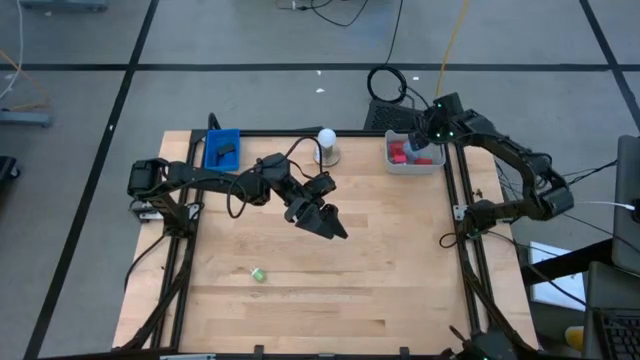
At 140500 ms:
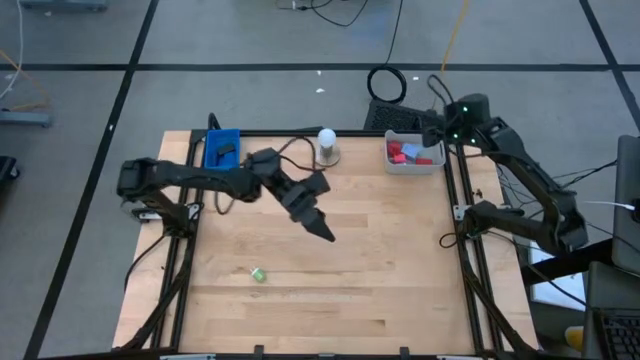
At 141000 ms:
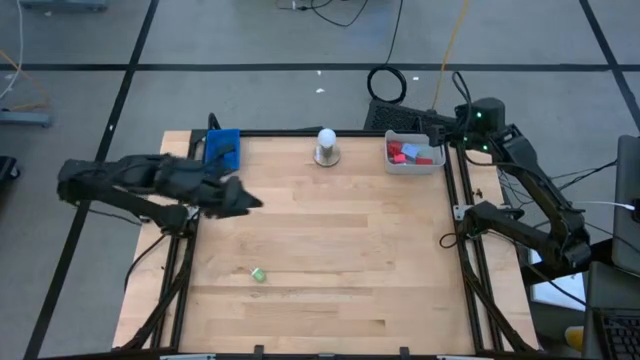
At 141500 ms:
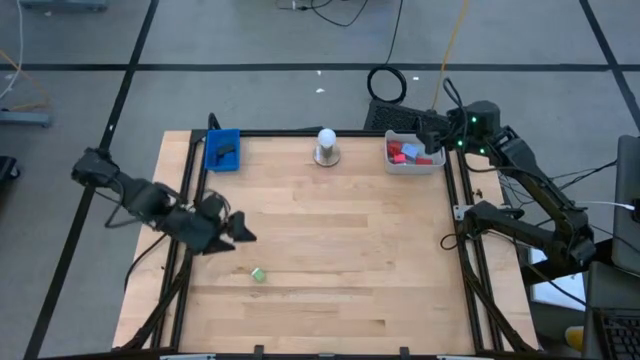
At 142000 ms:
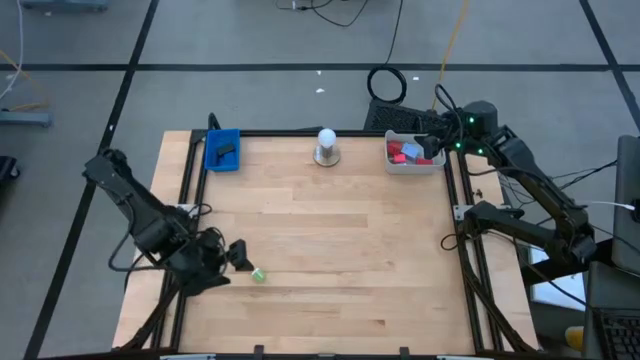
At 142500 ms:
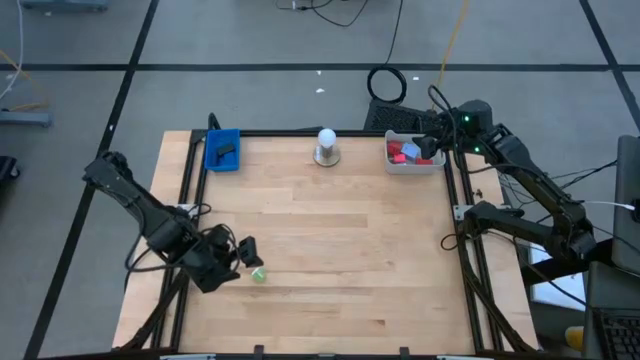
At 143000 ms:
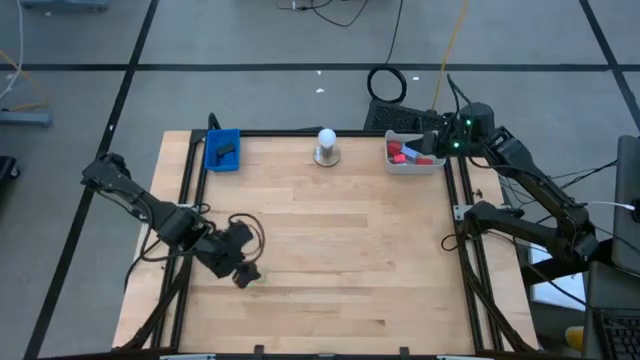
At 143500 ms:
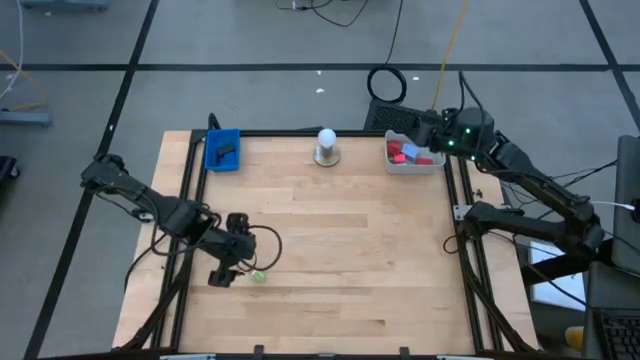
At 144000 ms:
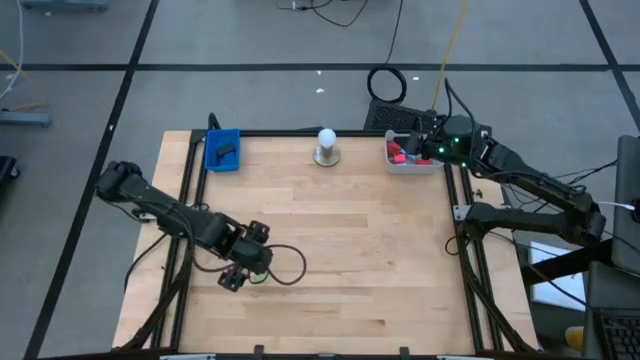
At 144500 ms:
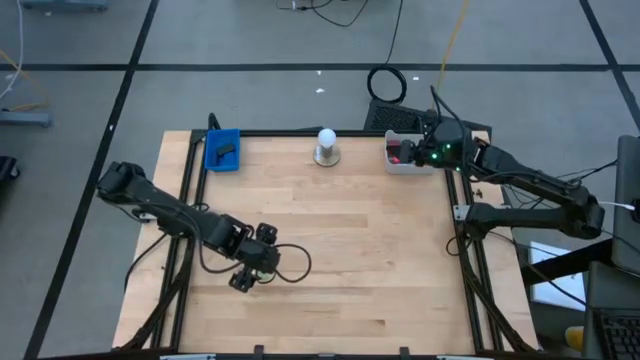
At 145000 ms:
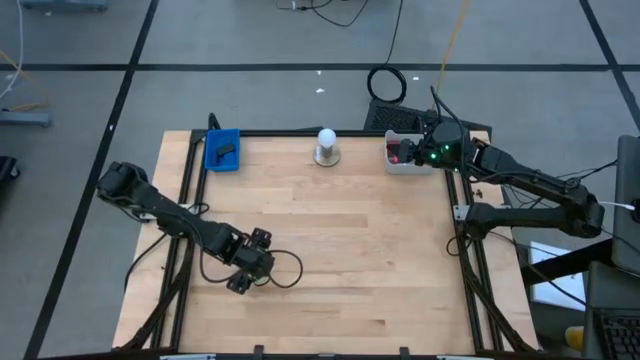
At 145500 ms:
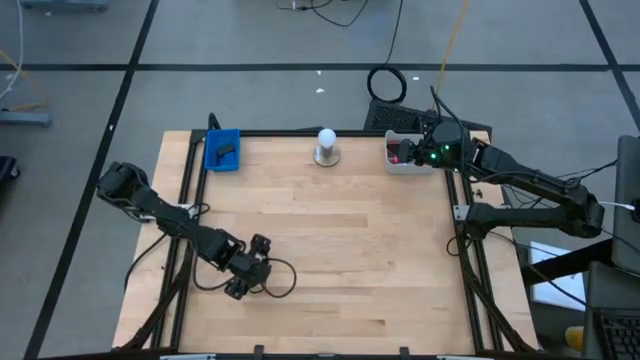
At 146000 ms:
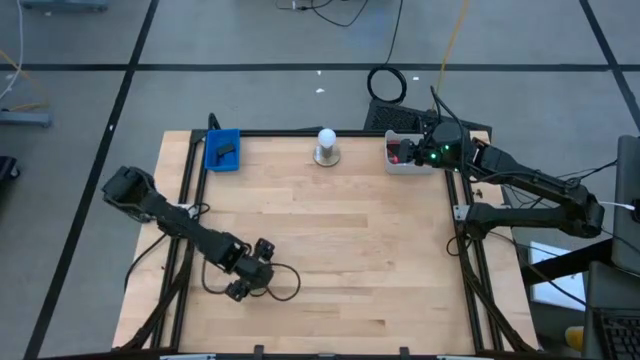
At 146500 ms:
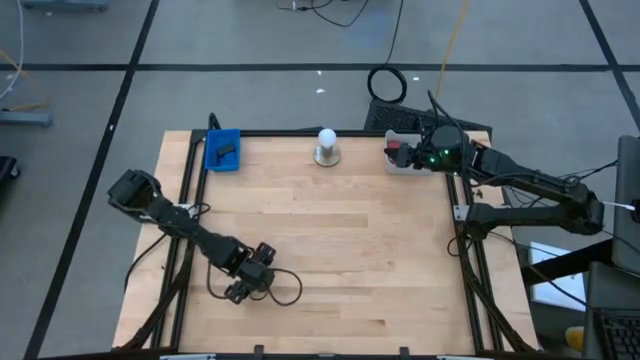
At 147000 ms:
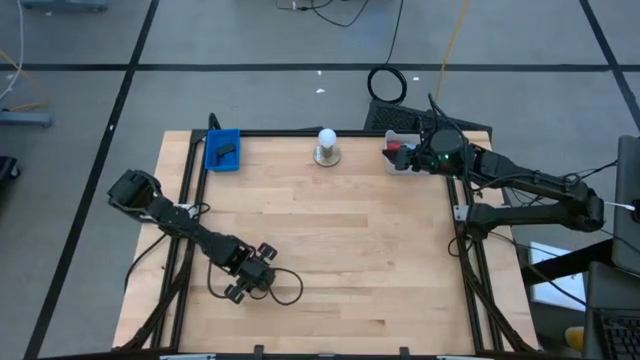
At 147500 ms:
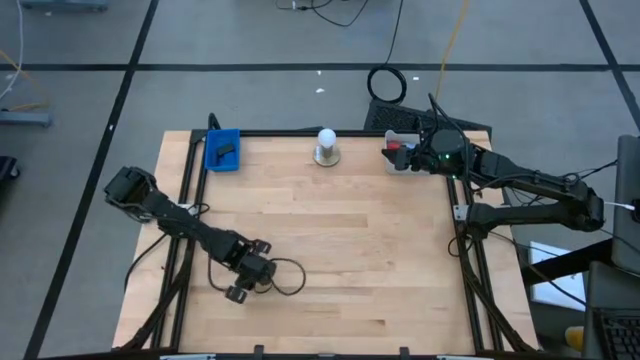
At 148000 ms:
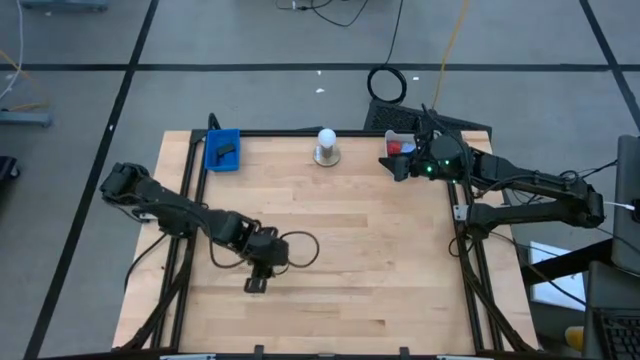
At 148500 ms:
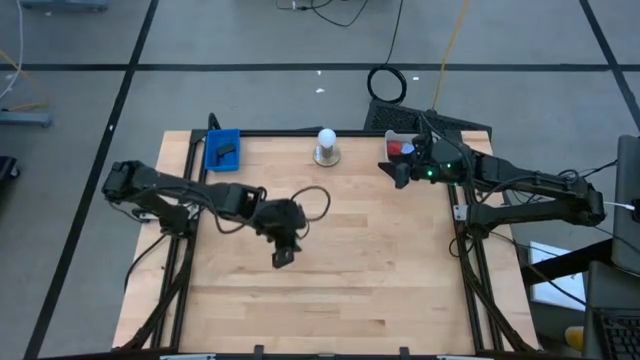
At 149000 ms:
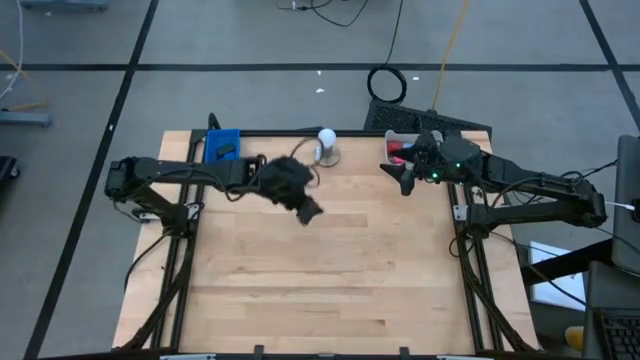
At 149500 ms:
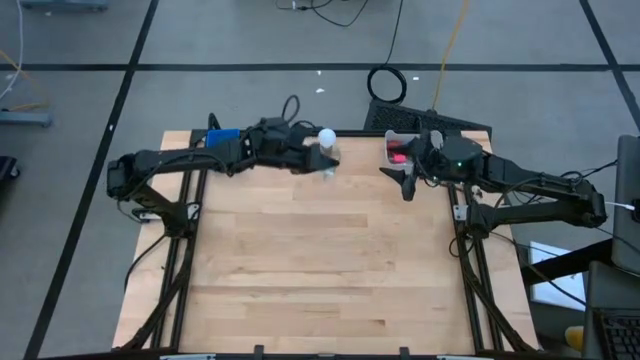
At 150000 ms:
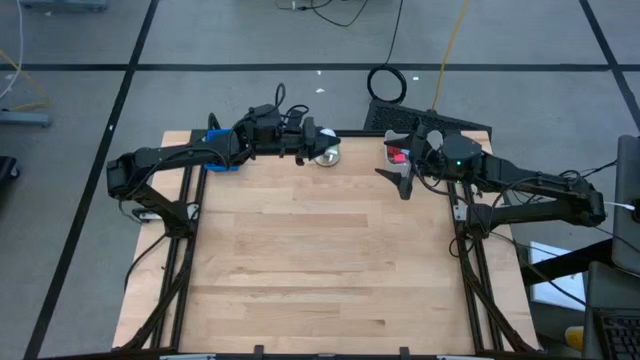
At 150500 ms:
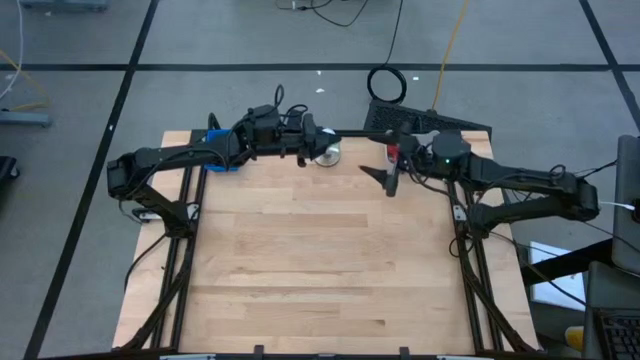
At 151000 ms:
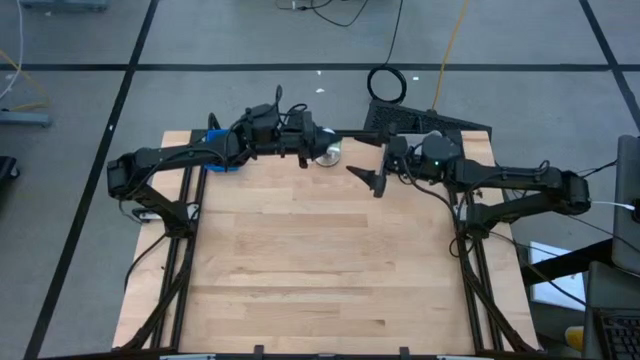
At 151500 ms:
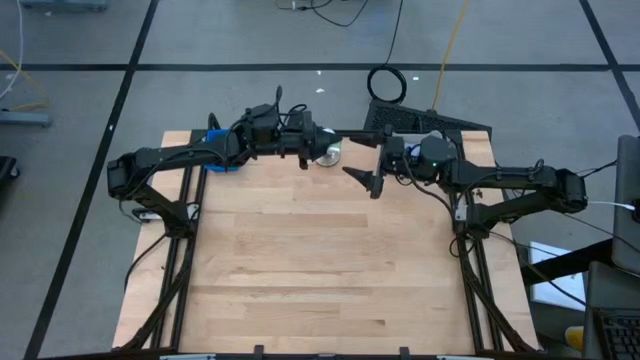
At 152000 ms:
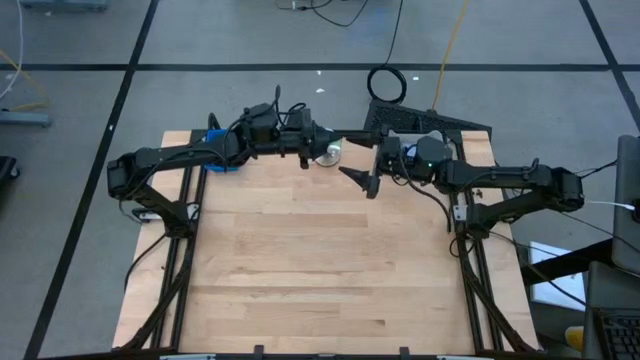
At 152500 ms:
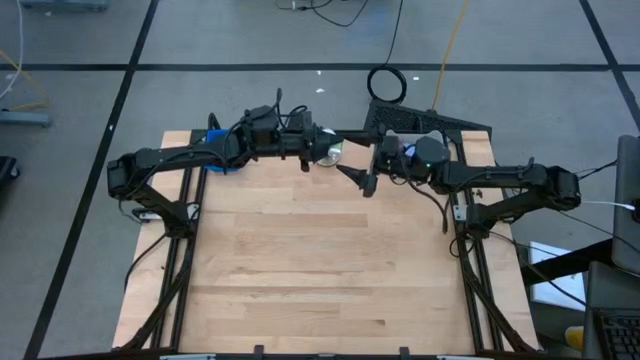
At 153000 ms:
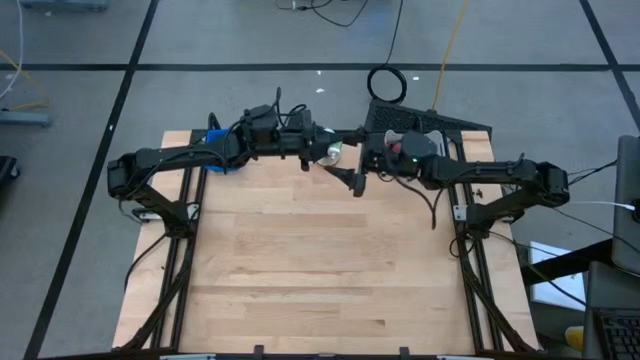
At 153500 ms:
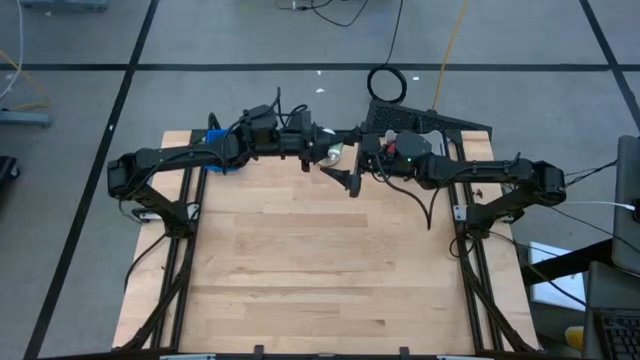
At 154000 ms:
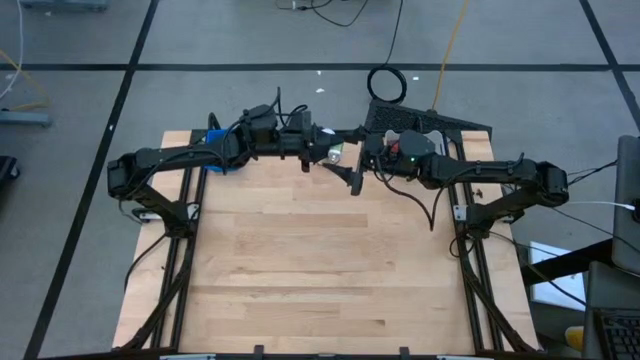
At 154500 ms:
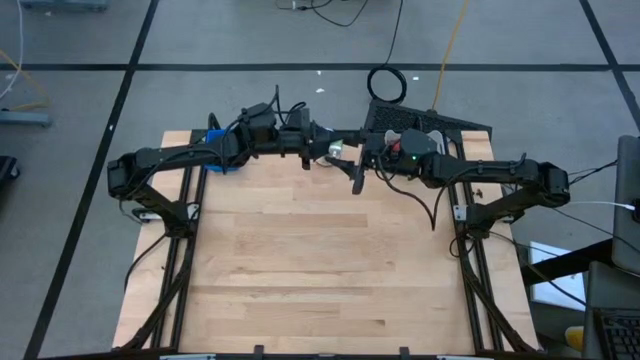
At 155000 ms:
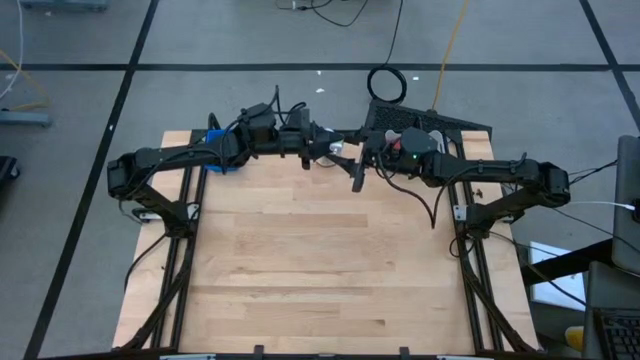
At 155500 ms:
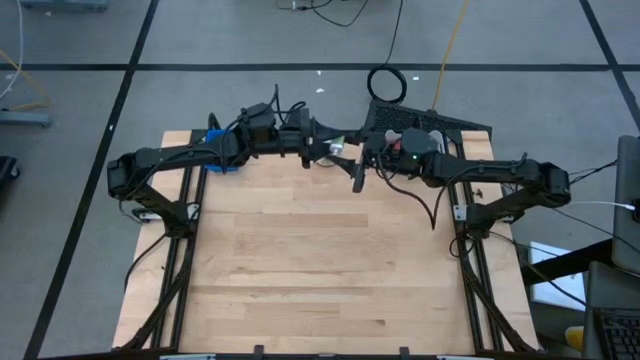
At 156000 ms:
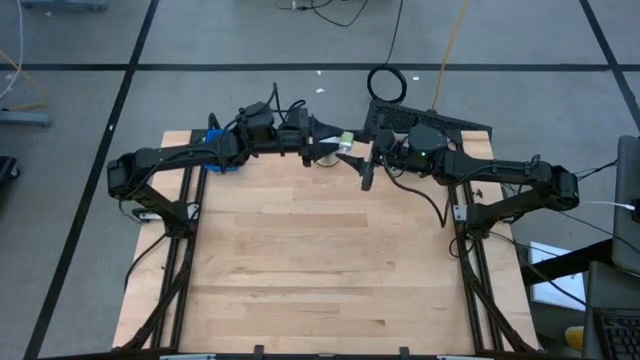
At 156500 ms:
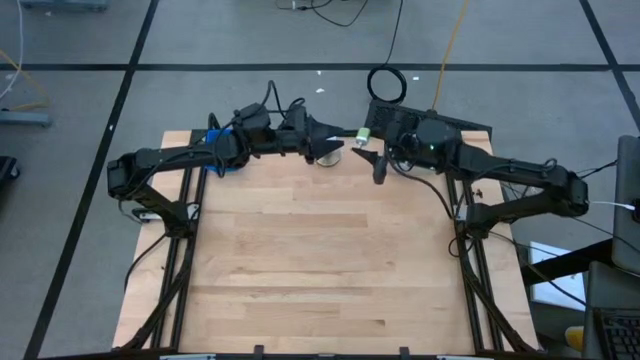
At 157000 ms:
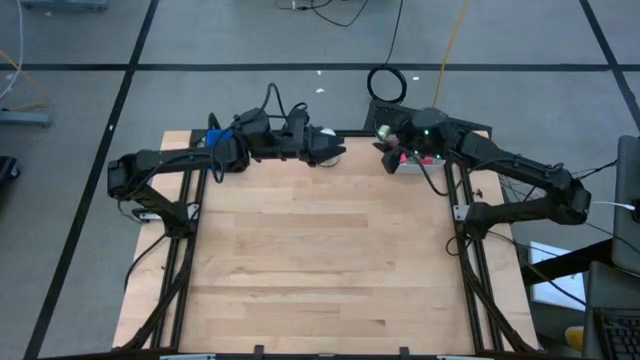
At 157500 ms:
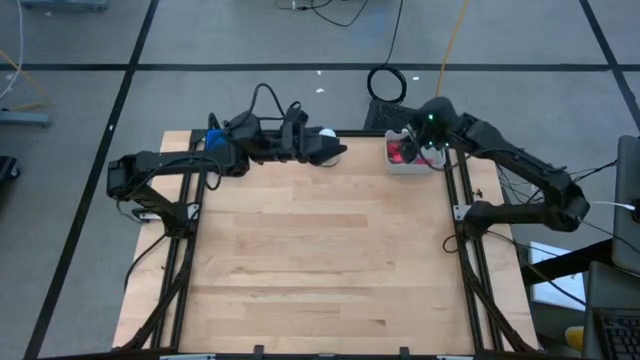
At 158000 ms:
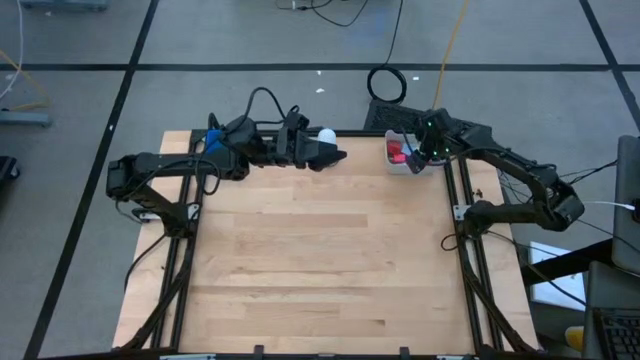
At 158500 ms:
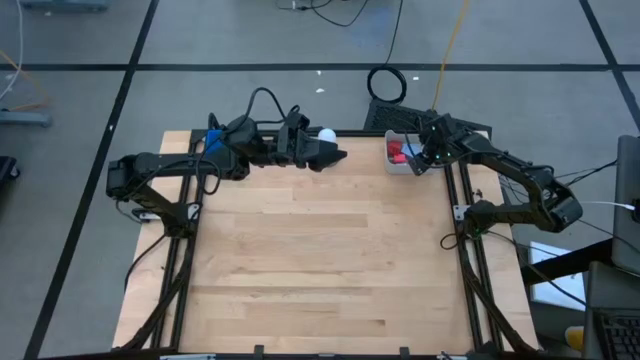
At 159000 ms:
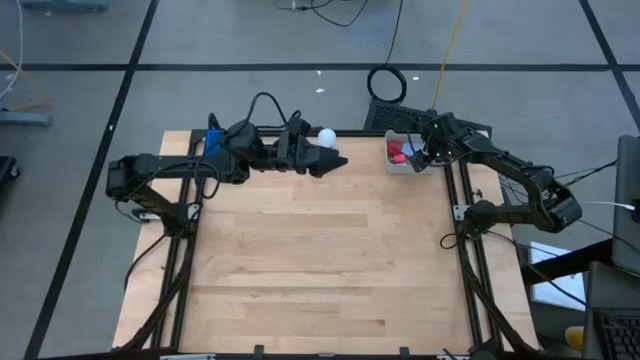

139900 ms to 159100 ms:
Task: Pick & Place Office items
Put the green charger adapter into the gray bin

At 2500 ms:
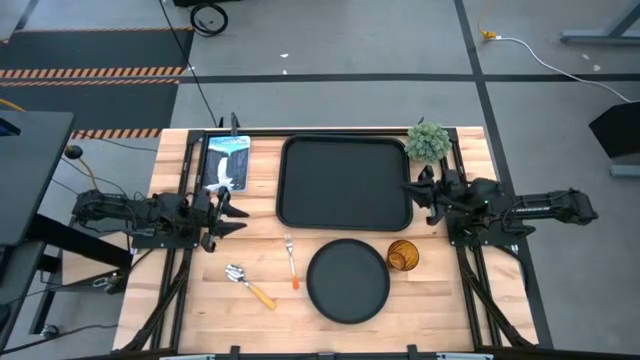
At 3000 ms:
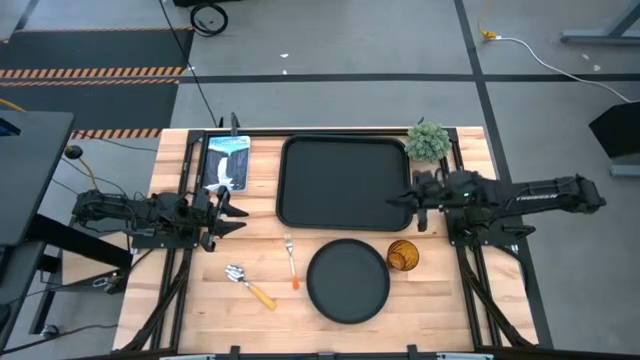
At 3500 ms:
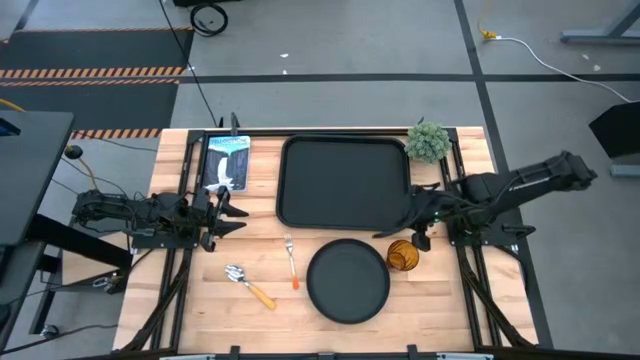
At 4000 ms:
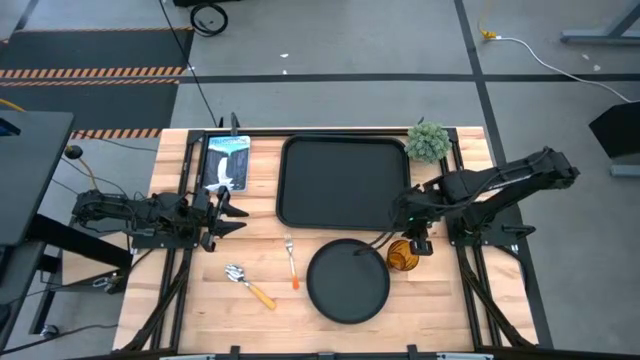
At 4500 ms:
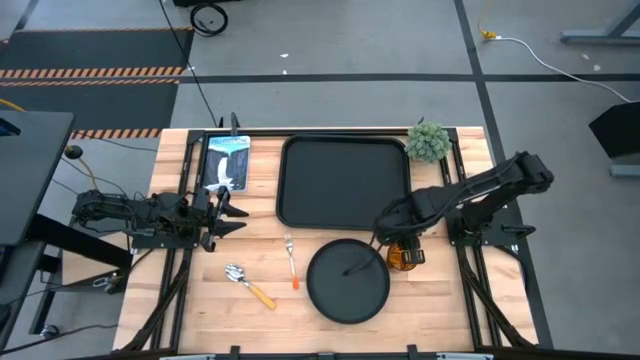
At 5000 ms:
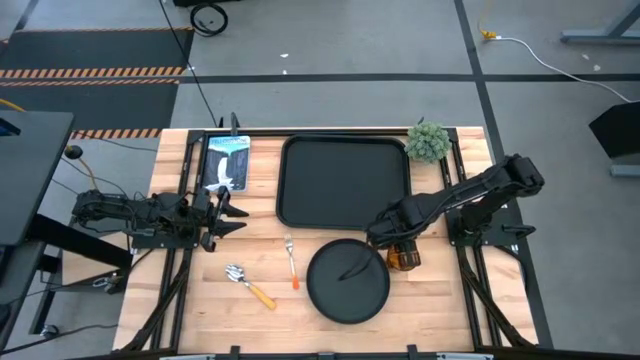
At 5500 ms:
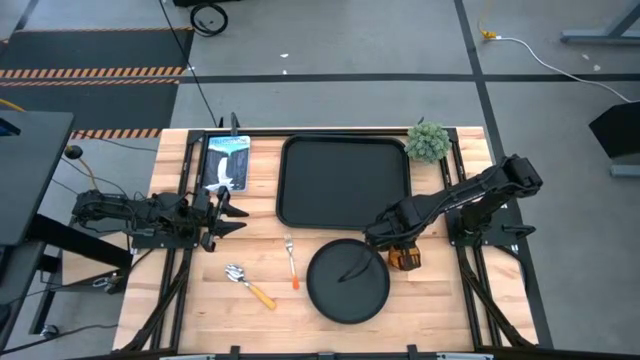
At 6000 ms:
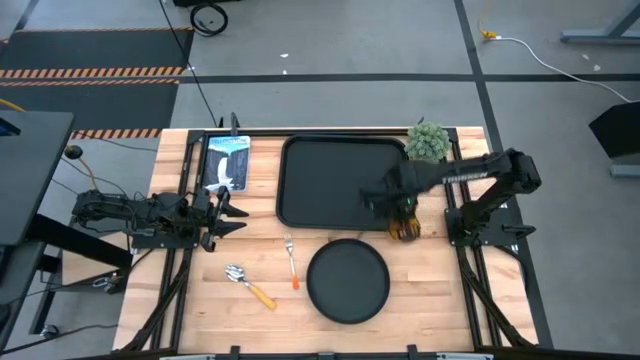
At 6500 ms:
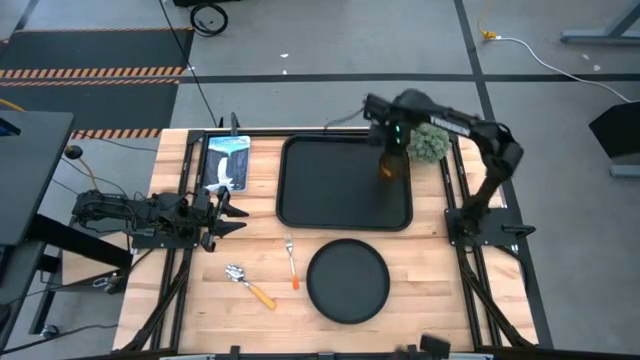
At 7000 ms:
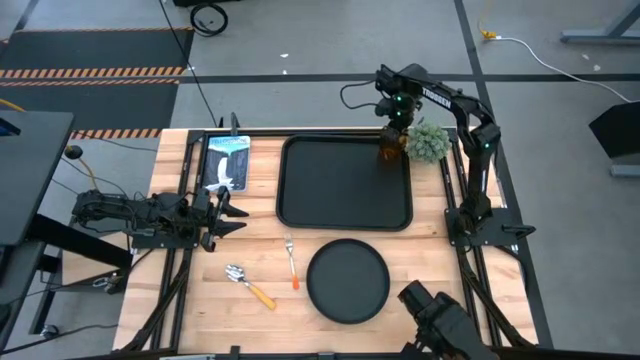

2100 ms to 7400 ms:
Task: Pick and place plate/cup/fork/spoon on tray
Put the orange cup on the black tray
